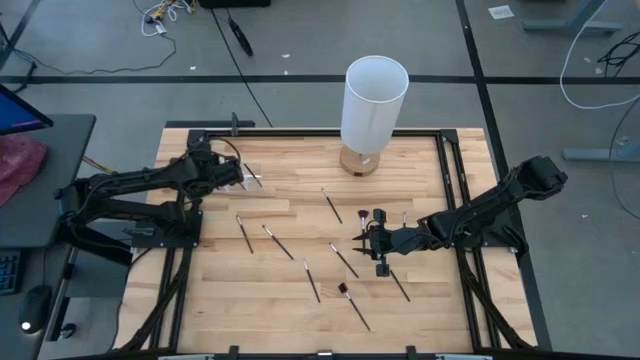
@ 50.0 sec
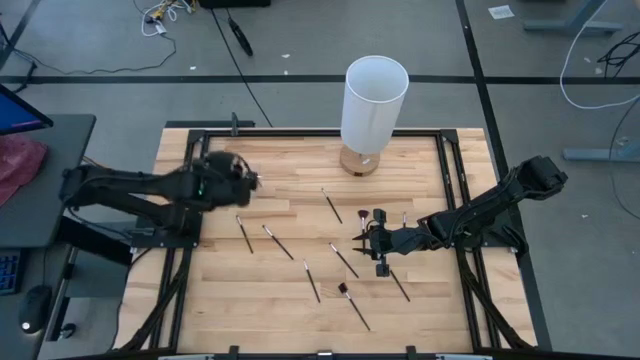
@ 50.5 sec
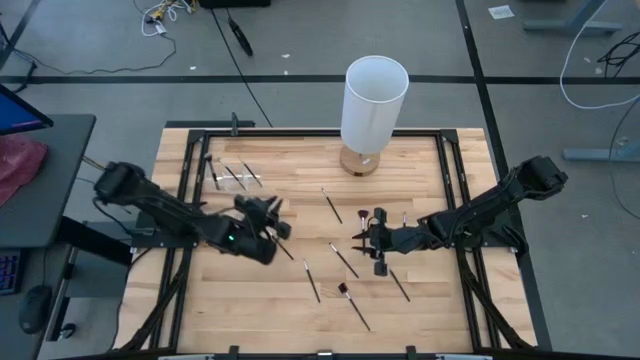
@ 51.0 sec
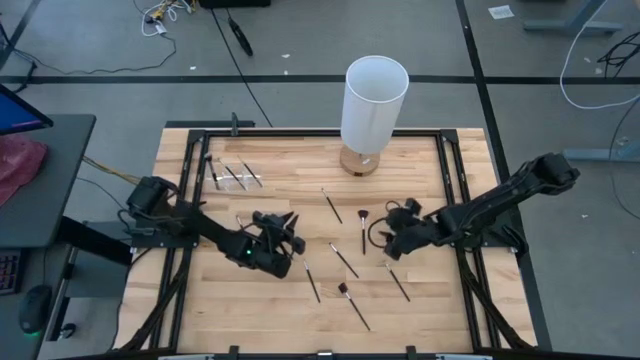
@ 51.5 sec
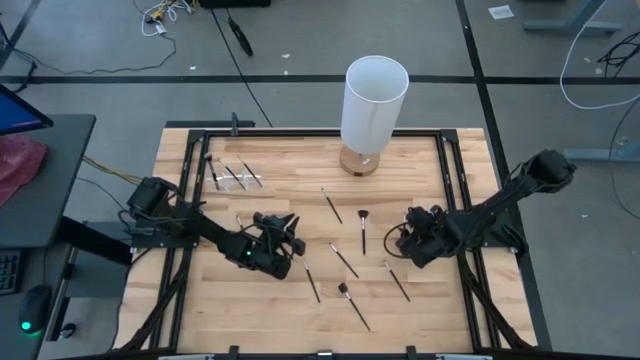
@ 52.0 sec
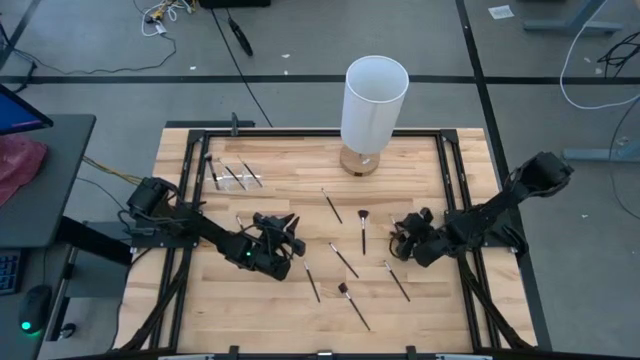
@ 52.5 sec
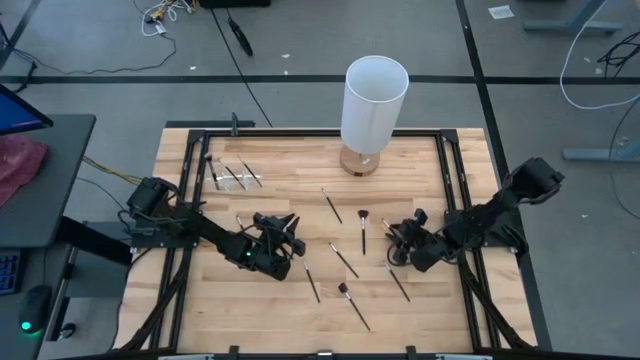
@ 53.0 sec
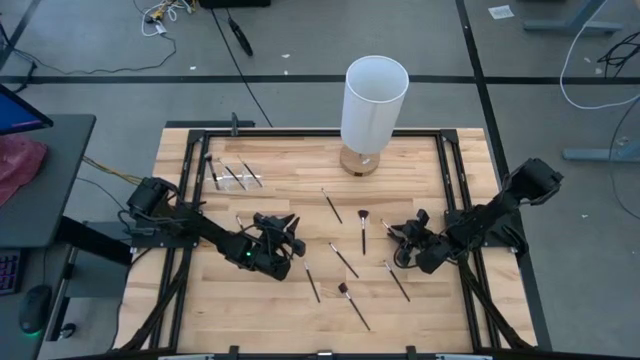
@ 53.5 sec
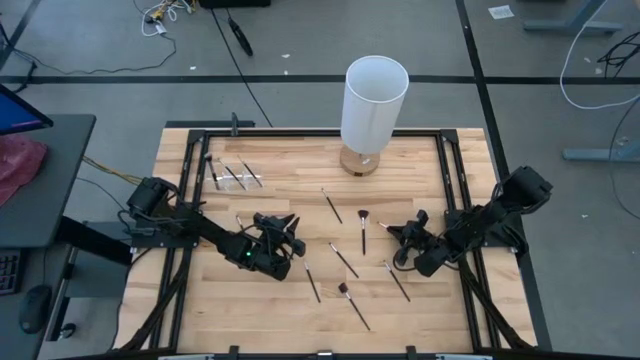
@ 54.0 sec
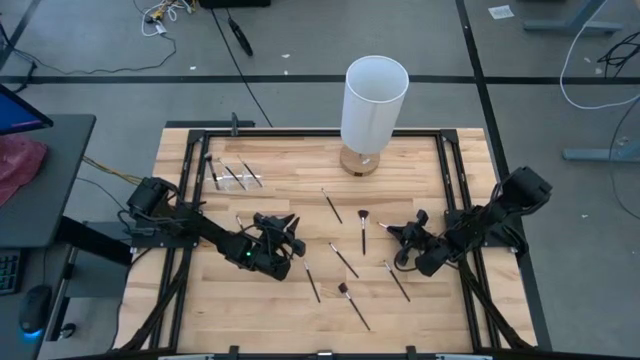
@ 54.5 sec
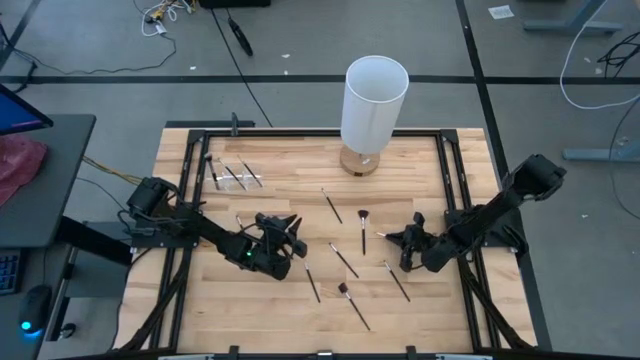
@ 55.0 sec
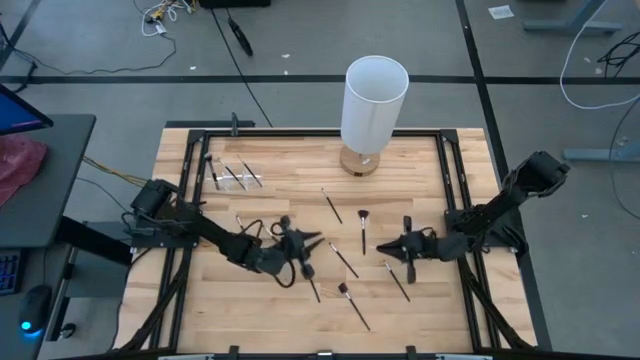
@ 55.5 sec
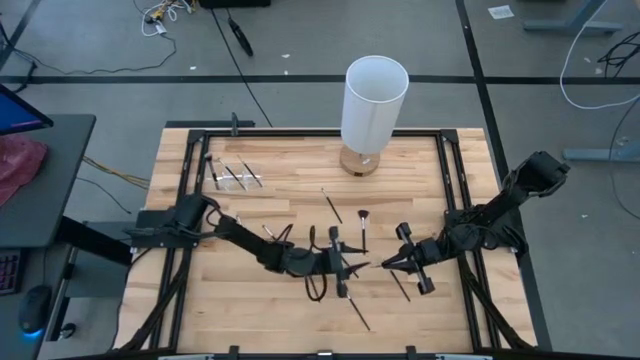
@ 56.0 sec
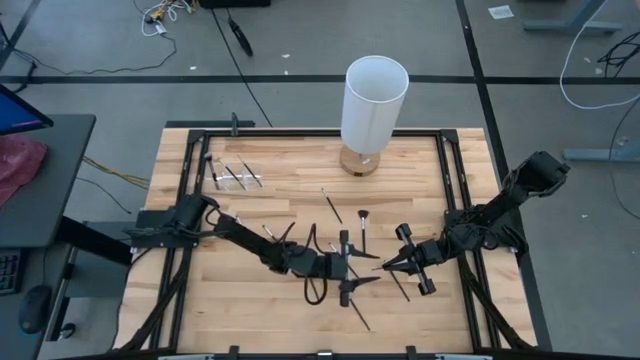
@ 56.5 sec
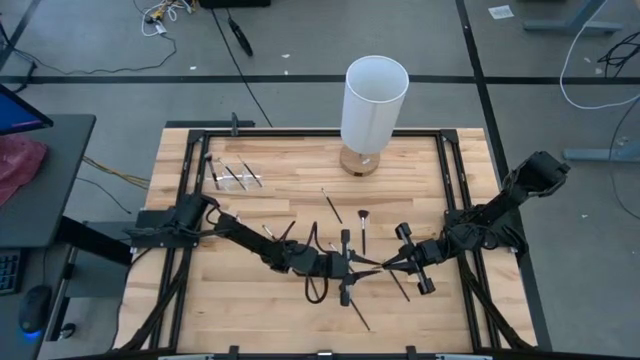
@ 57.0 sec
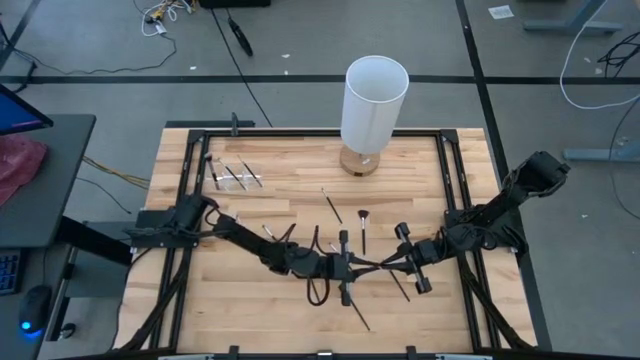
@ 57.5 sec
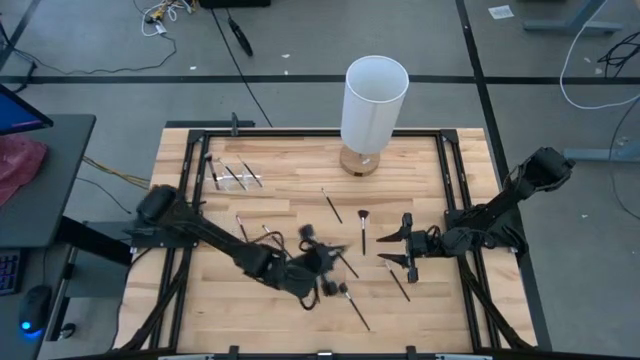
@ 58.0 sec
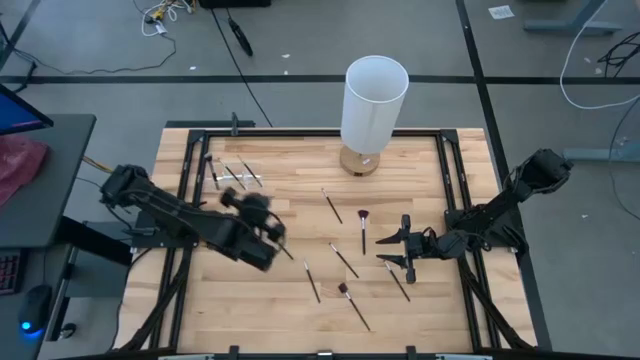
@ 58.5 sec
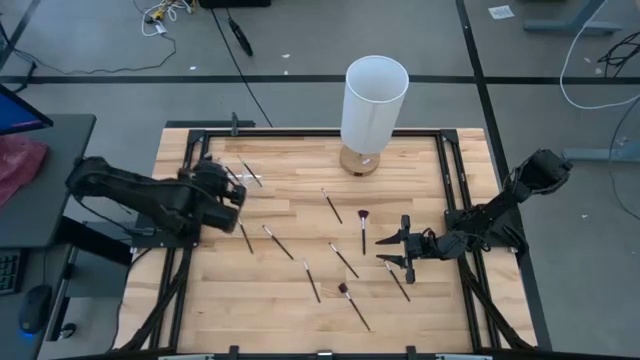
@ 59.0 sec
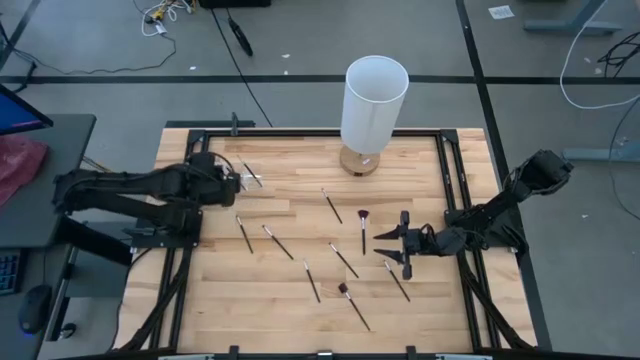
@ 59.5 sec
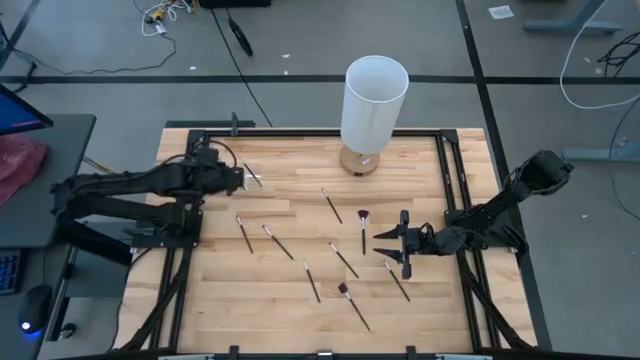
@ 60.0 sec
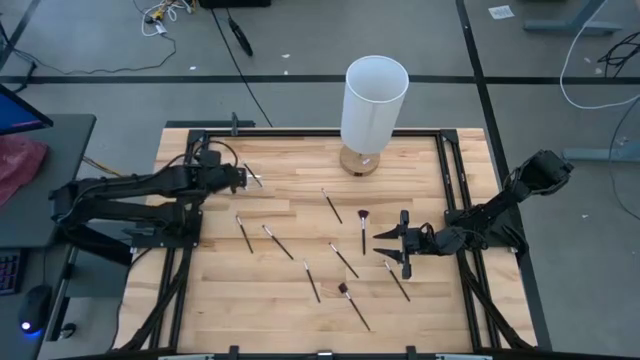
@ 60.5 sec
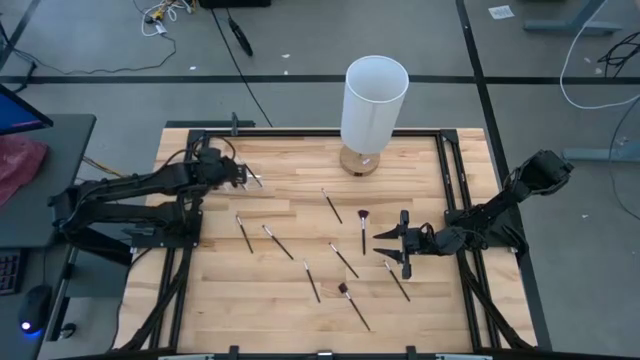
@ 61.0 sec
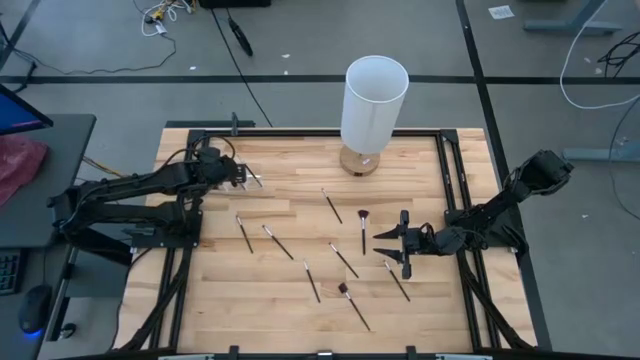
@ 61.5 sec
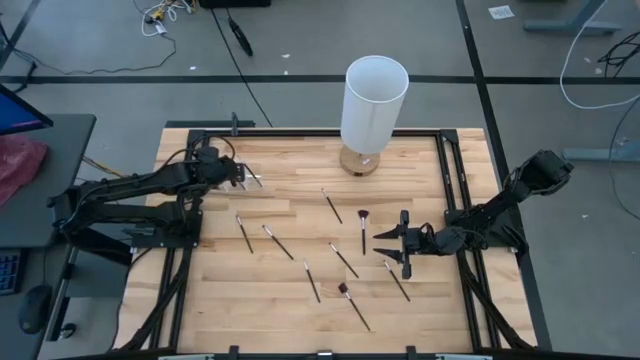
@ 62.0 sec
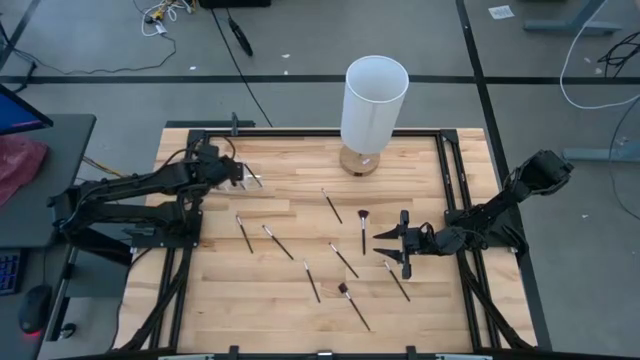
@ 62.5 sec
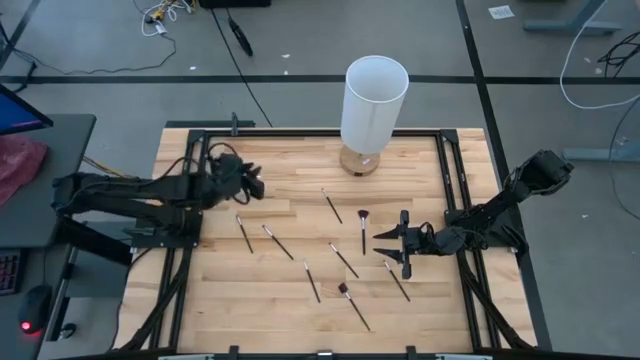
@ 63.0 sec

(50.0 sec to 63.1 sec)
Task: Put items in baskets/containers
Put the black eyeshadow brush into the transparent organizer

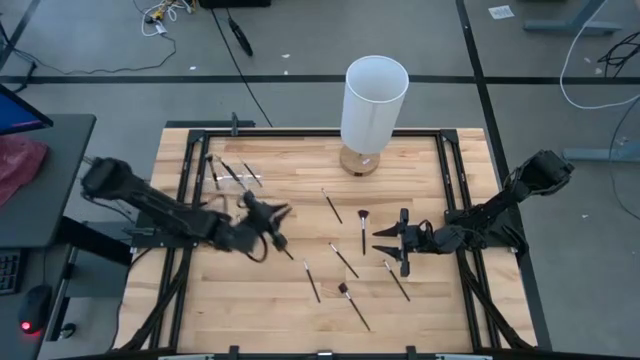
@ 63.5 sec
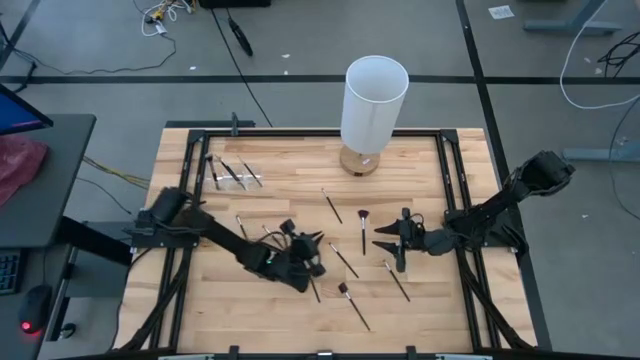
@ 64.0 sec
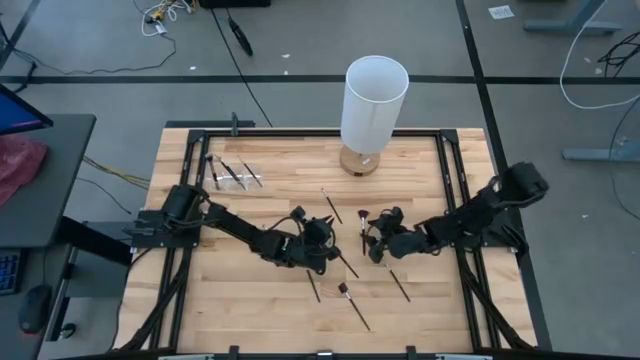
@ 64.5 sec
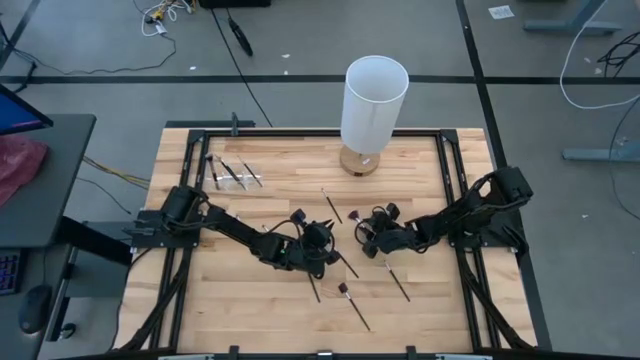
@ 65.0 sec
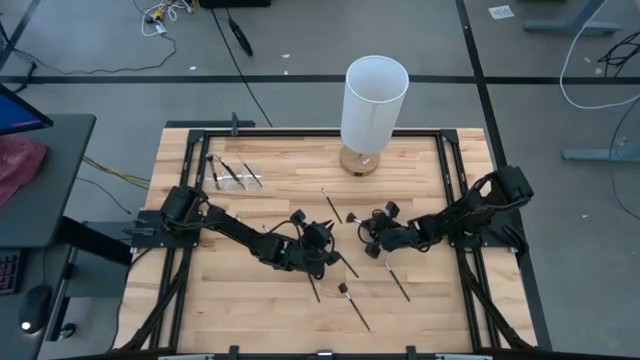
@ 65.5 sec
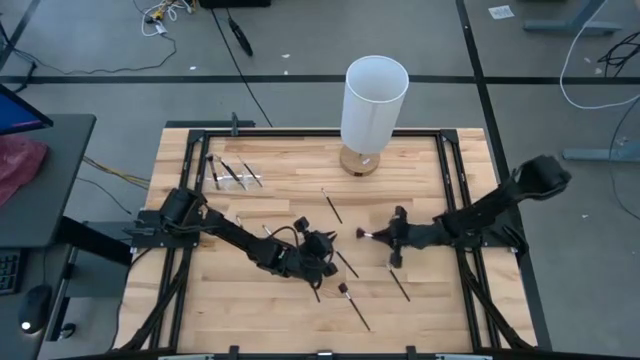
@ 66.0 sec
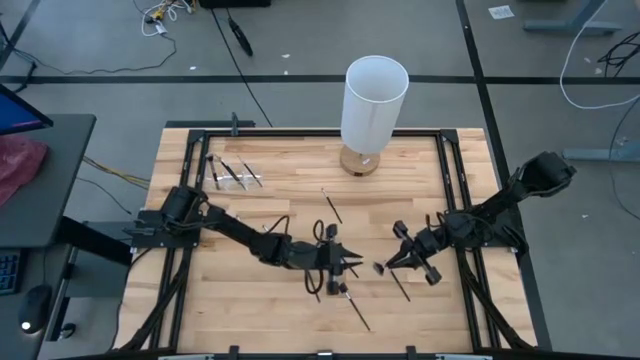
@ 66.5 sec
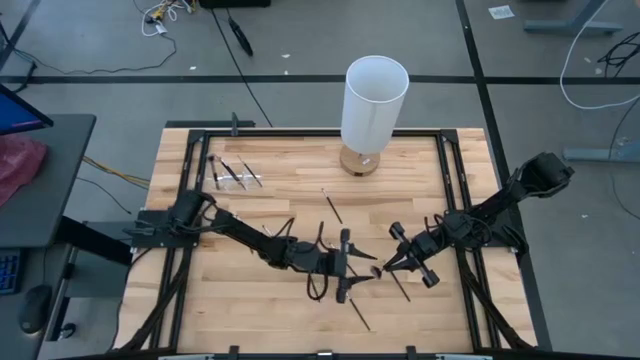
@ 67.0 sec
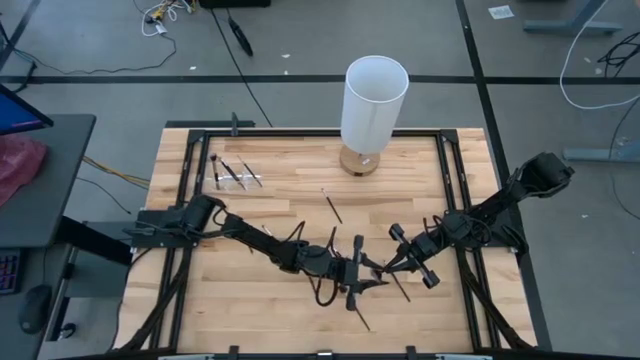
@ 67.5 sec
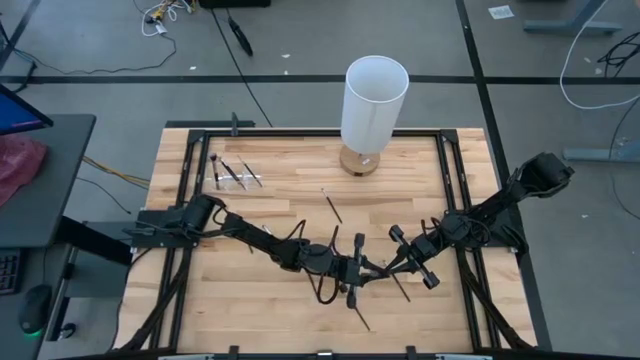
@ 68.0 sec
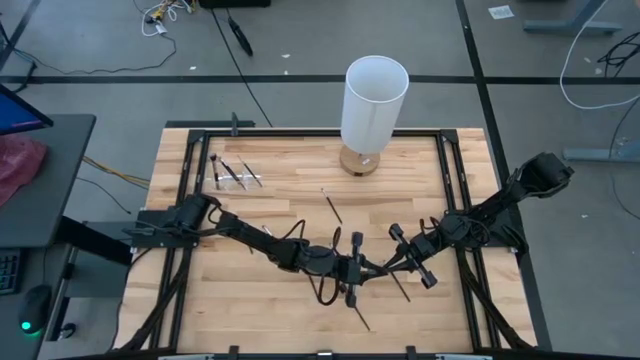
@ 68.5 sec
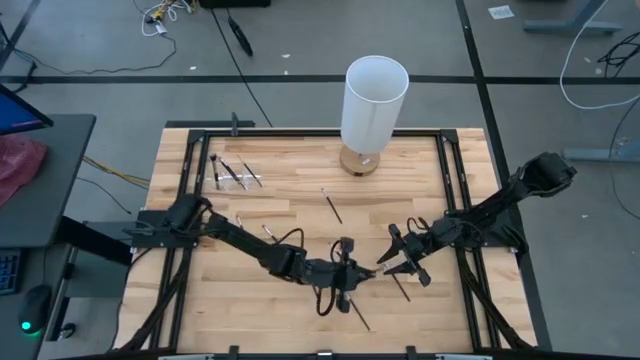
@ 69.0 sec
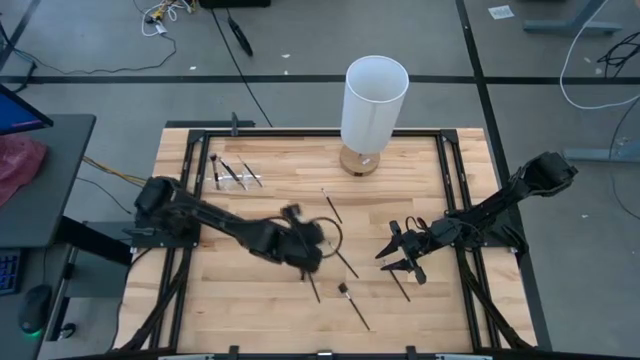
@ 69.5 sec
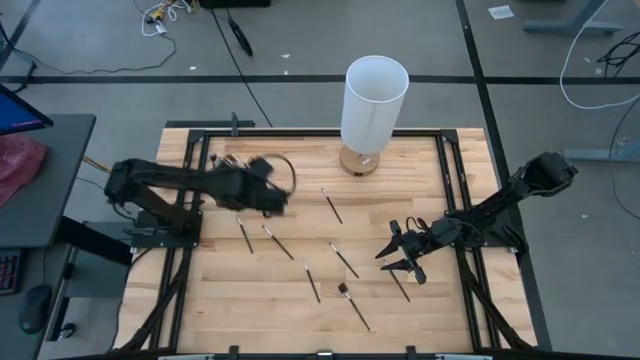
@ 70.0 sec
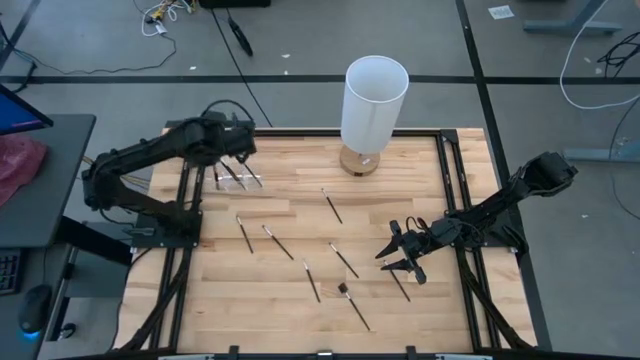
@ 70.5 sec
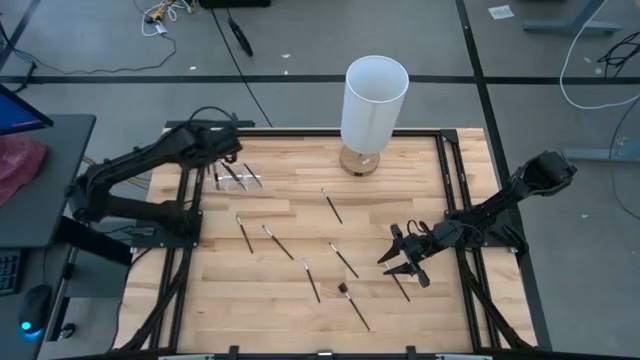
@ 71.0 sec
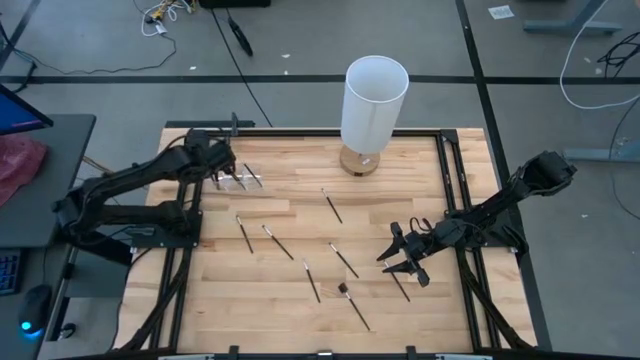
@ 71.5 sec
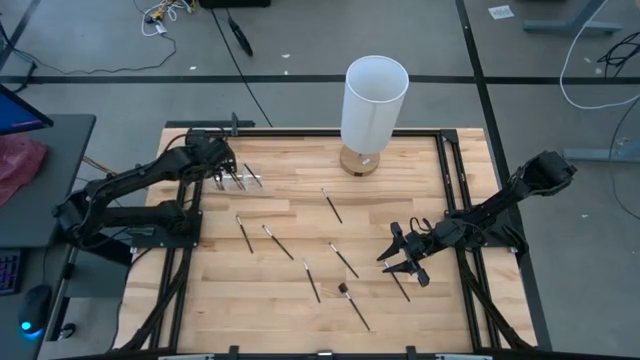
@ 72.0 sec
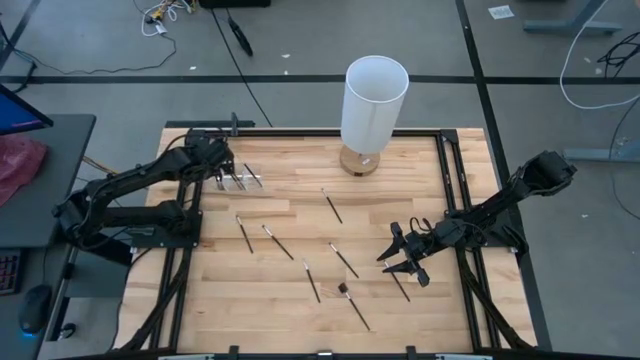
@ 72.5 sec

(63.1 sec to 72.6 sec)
Put the black highlighter brush into the transparent organizer
